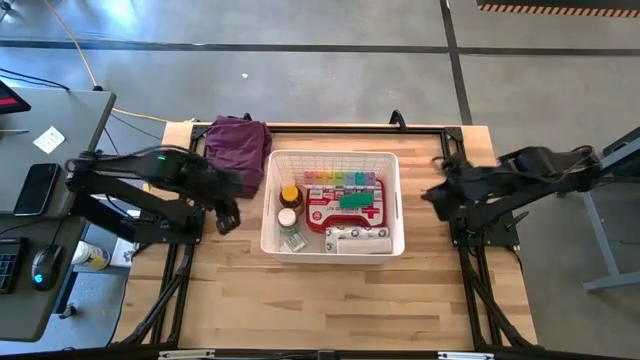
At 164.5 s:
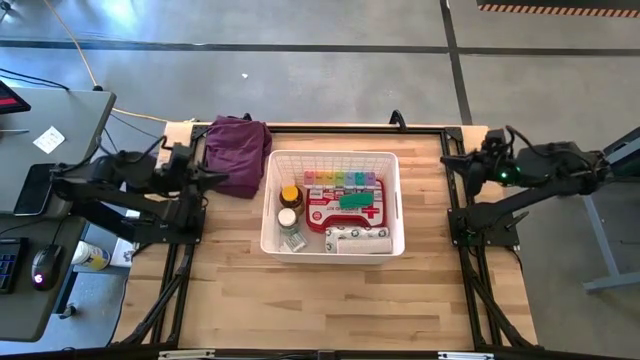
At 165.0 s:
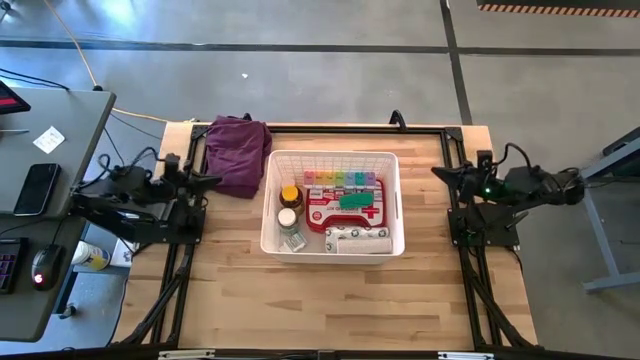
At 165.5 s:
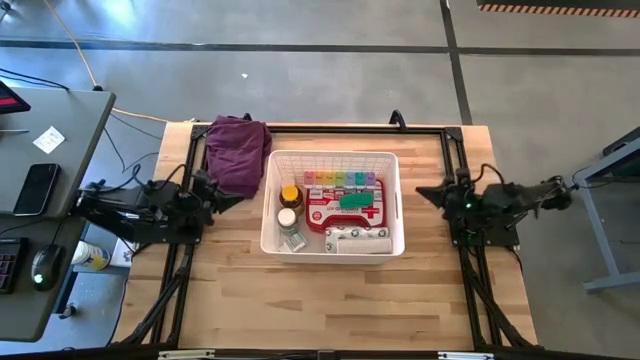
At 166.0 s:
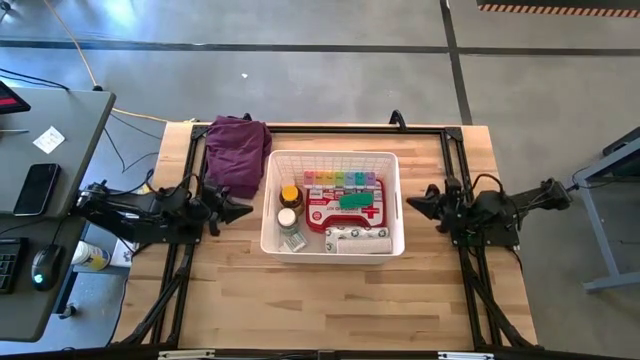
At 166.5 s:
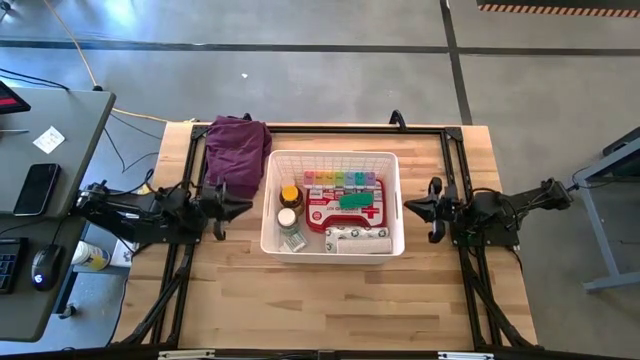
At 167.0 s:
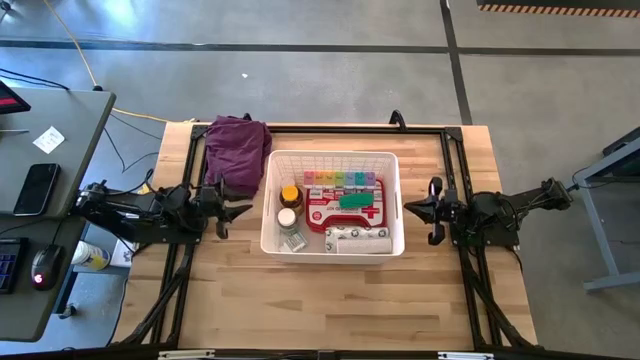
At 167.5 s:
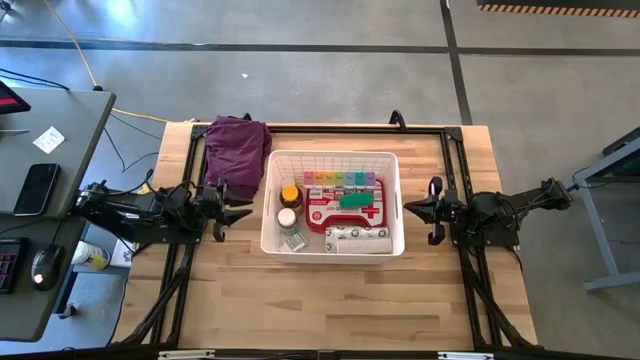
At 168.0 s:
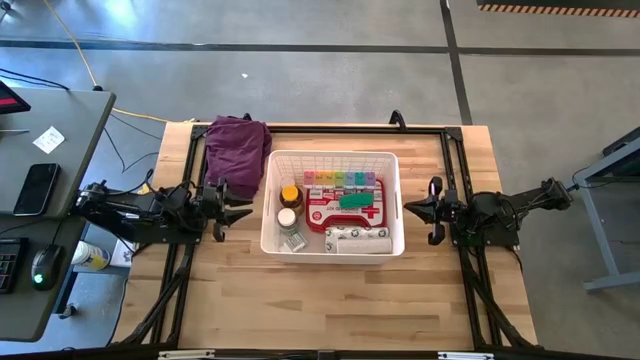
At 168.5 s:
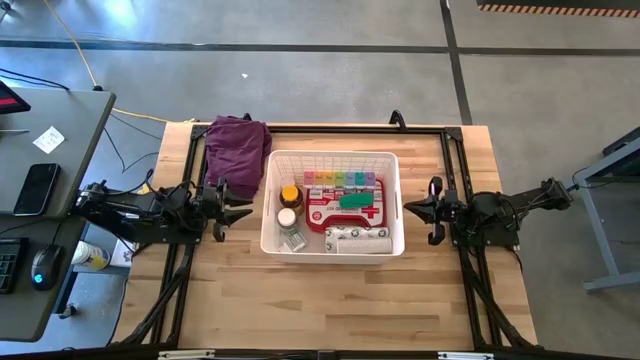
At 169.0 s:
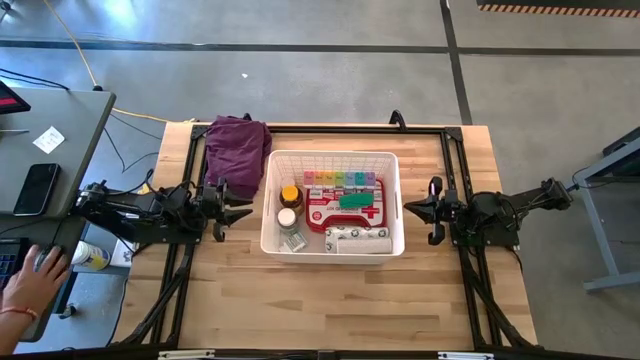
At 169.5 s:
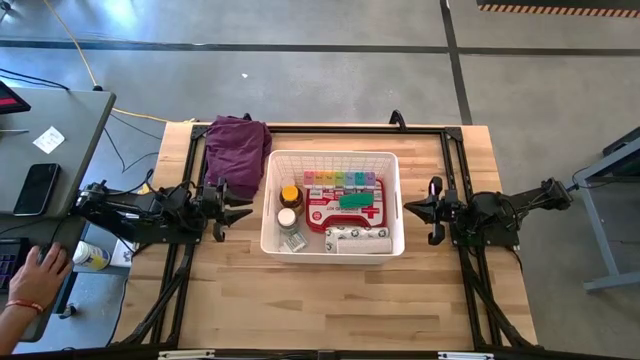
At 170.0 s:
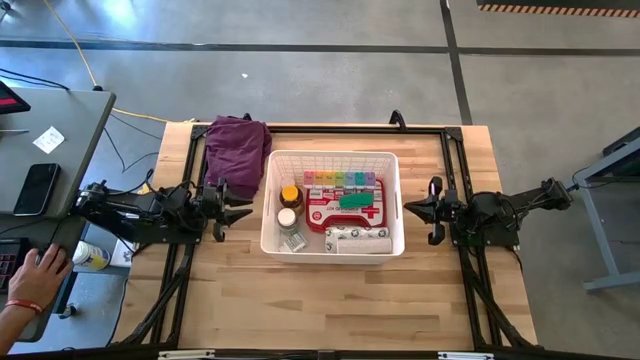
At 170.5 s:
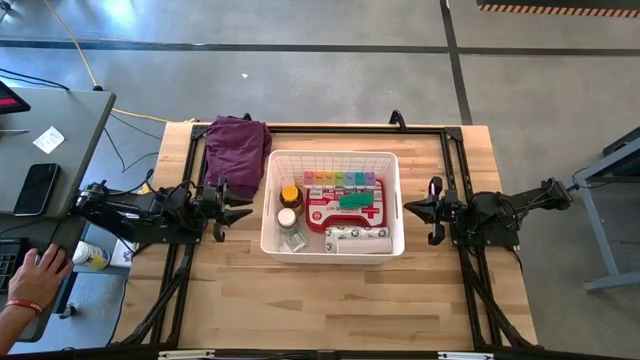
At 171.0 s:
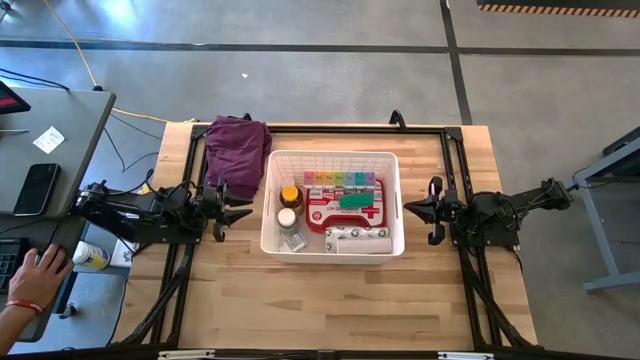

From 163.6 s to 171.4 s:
Task: Pick & place medical supplies in basket/bin
Return to Home Position

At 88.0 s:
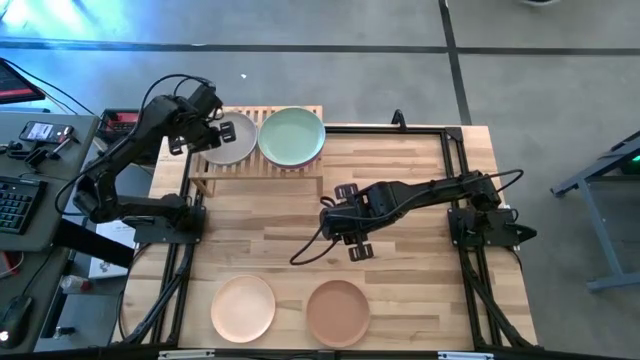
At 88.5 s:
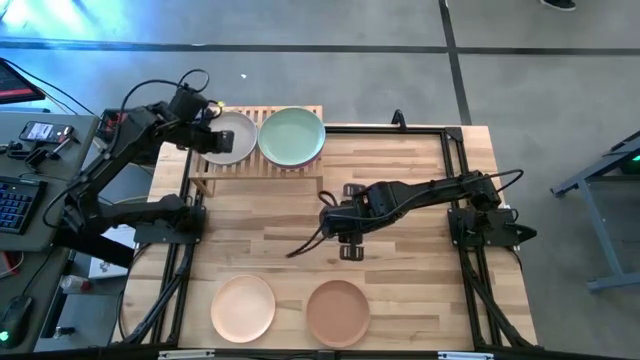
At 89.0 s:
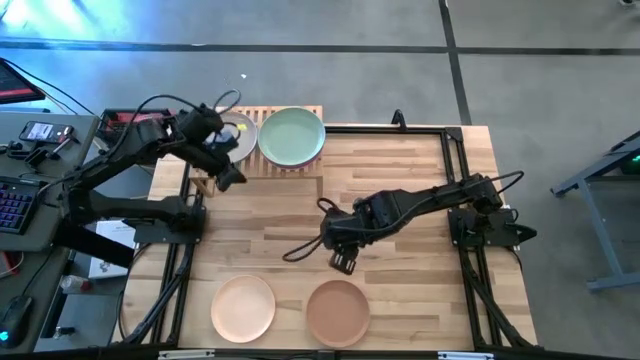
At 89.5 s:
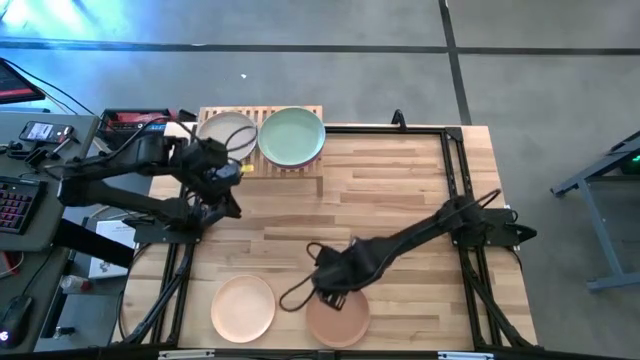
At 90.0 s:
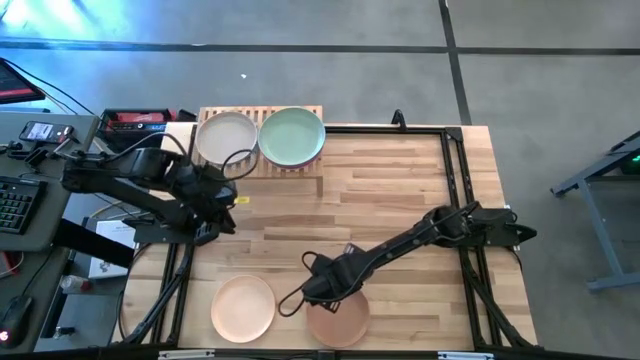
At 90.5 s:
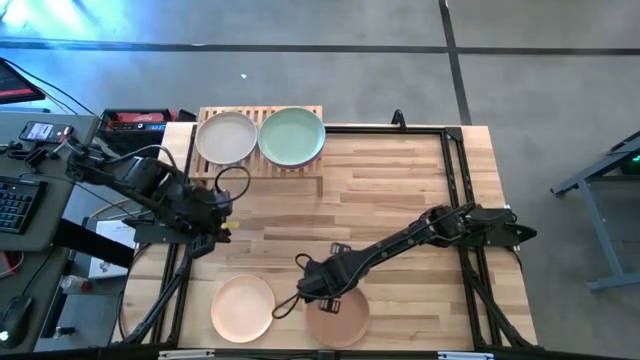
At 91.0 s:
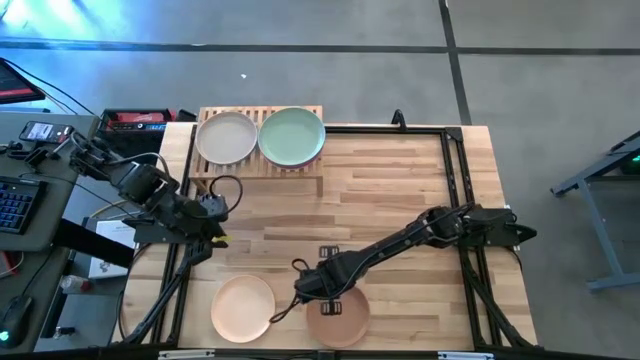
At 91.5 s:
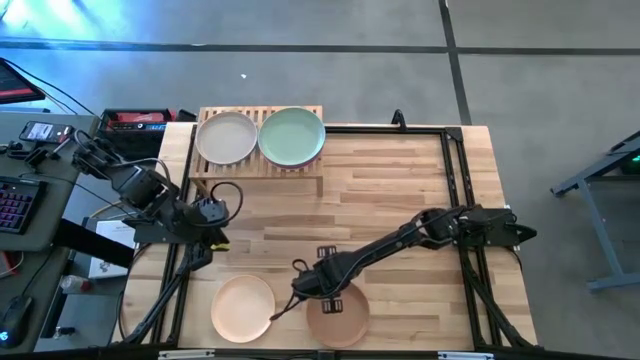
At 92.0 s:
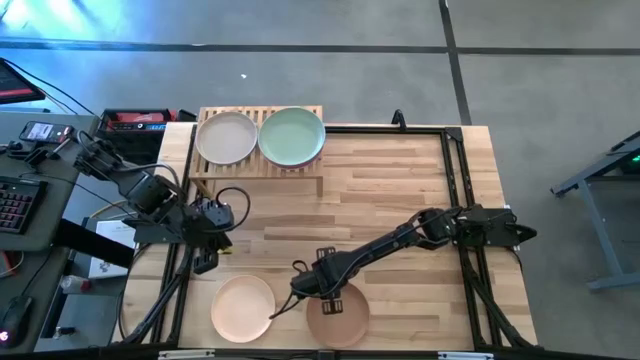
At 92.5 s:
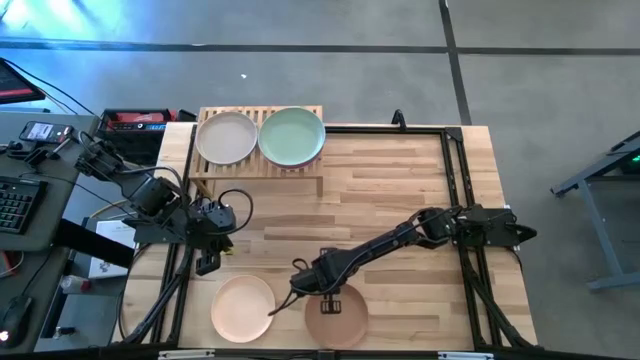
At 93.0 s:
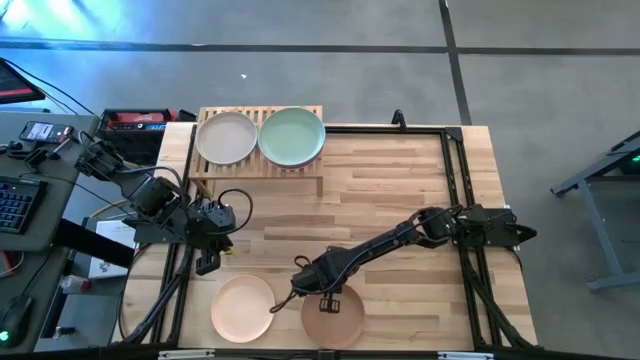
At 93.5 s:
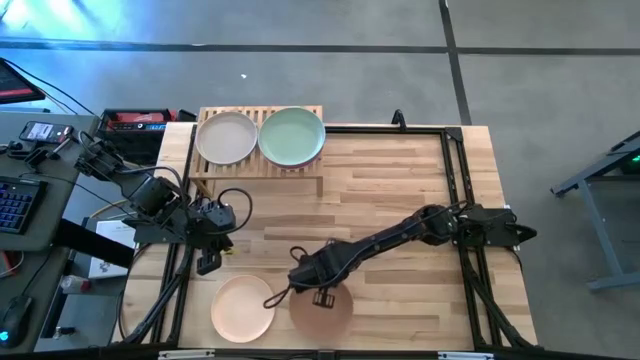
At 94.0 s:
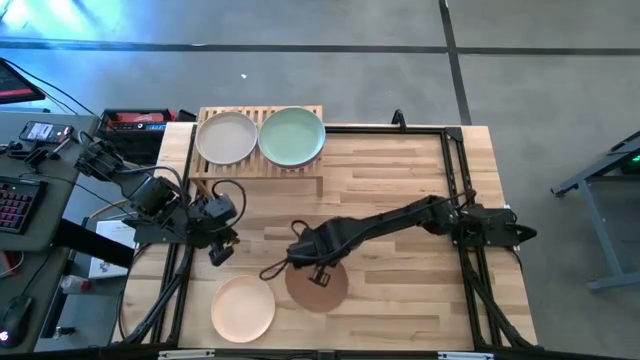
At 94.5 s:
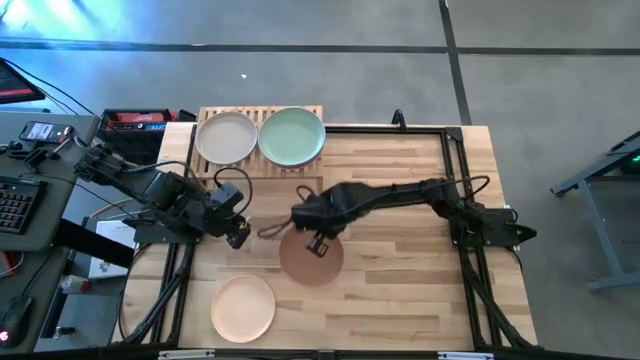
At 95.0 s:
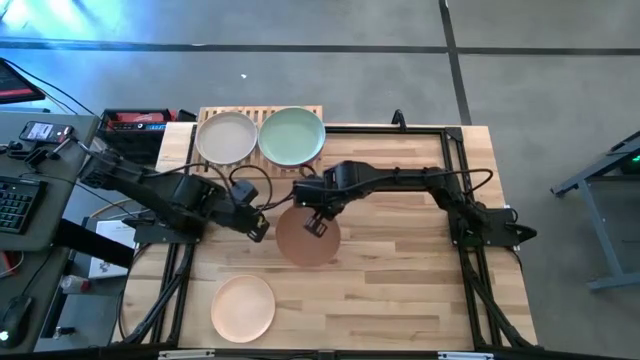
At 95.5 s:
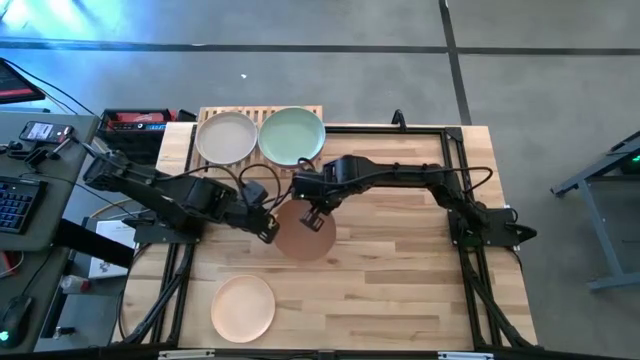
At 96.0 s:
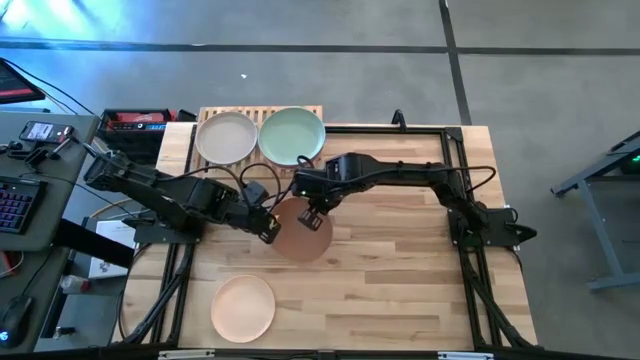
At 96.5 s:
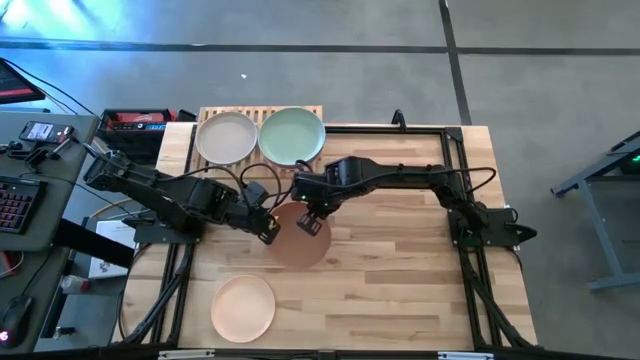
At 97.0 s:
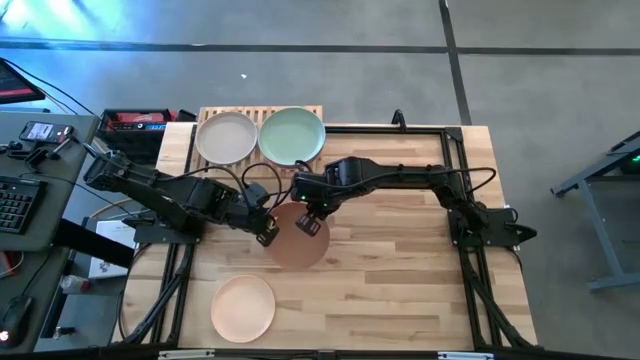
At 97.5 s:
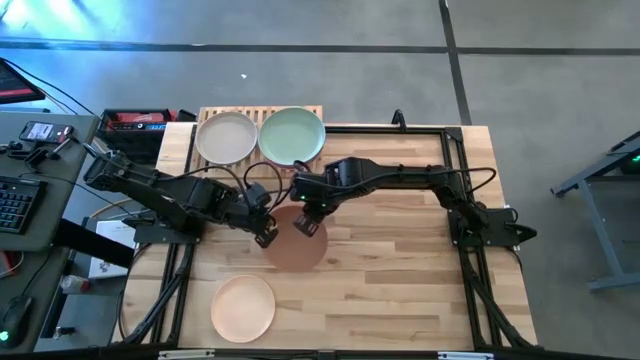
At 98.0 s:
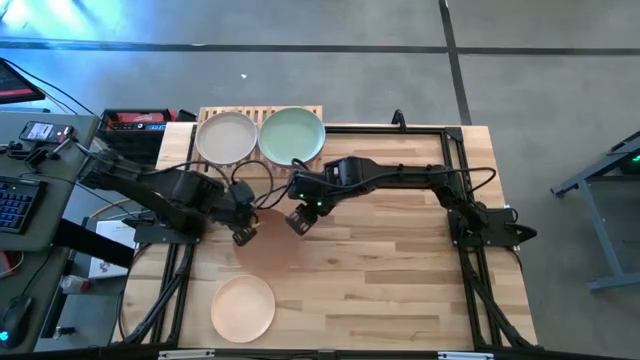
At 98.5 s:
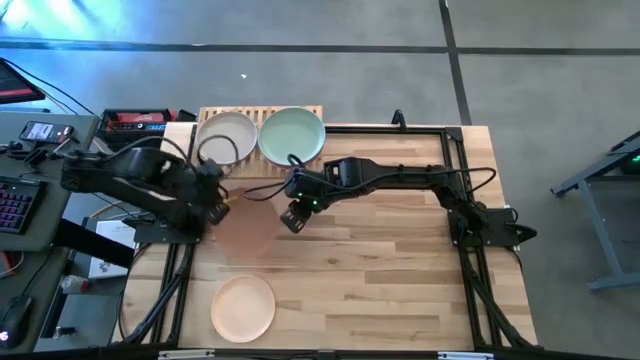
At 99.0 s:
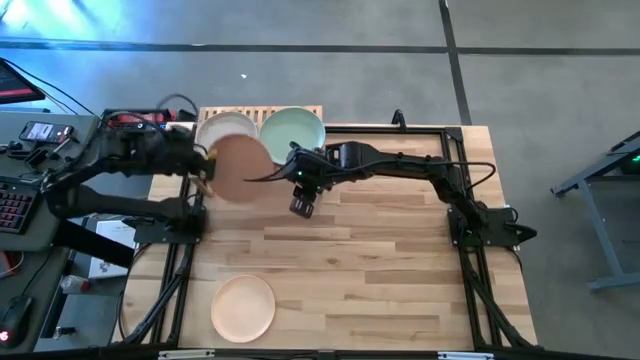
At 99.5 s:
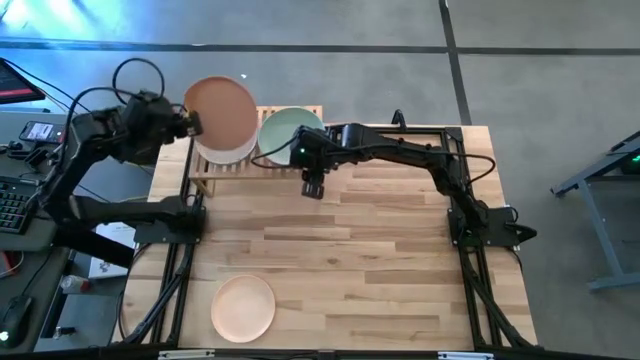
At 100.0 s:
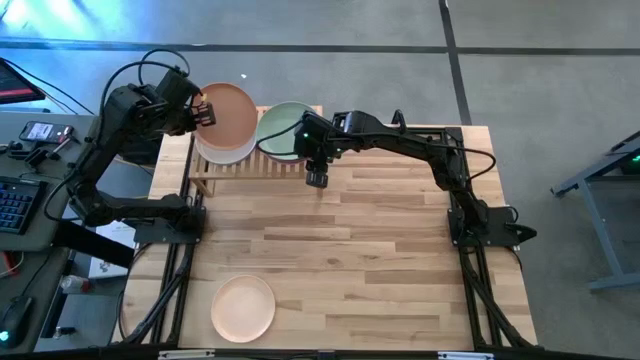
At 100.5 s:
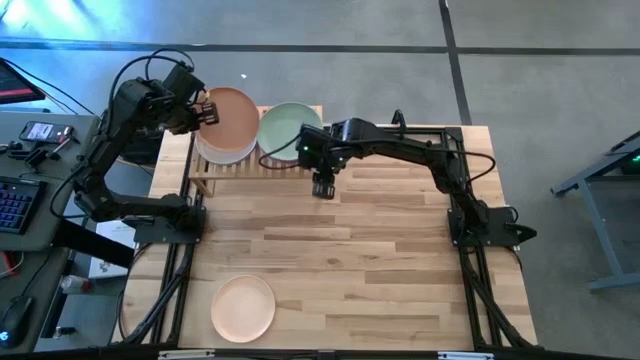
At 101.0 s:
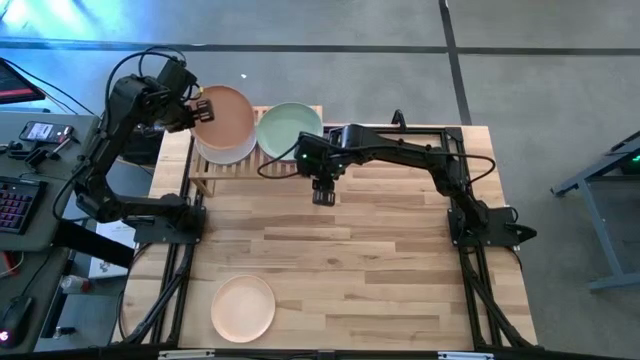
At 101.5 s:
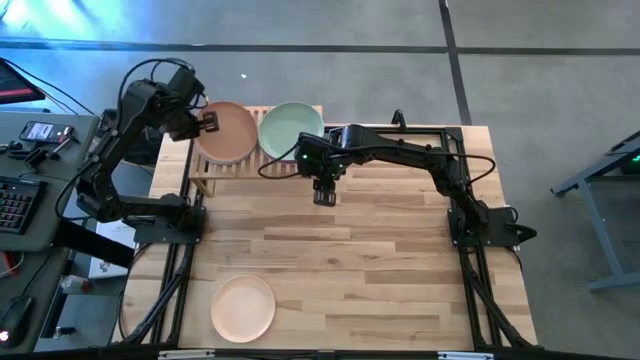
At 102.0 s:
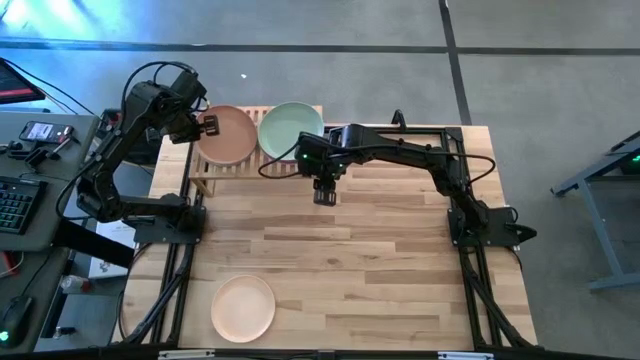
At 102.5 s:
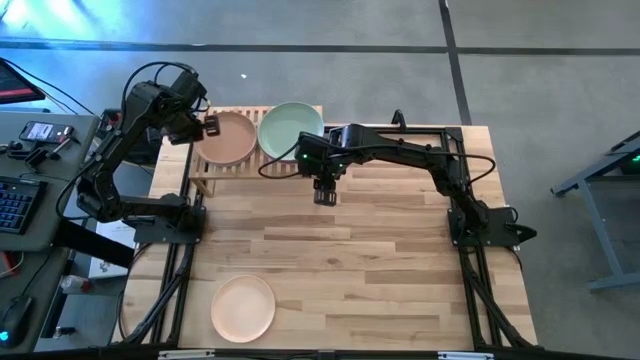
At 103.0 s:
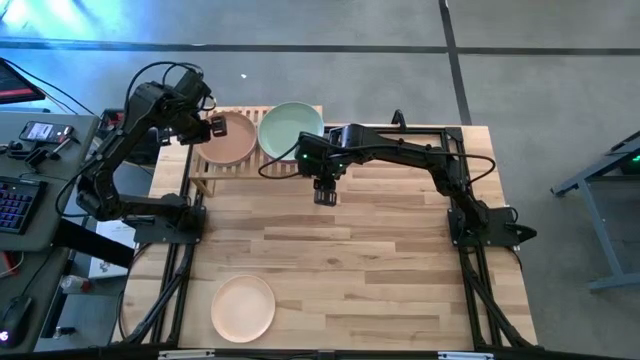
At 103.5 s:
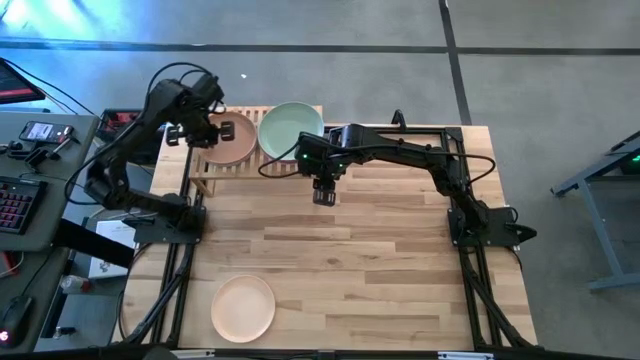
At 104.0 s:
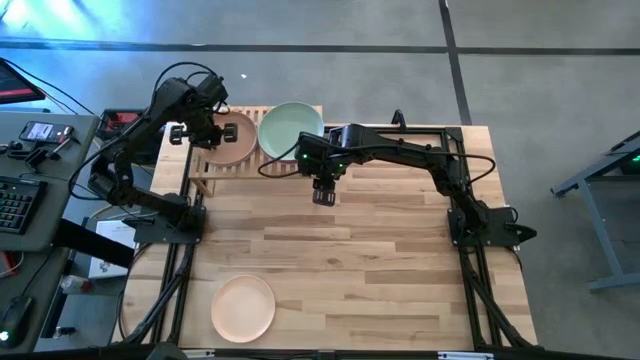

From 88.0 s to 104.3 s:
Task: Place and stack plates onto a shelf
Stack the brown plate on top of the gray plate on the shelf
